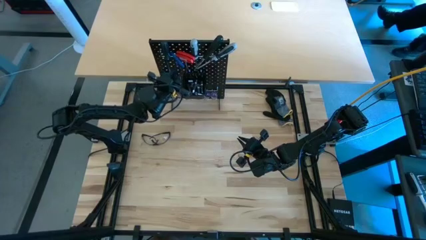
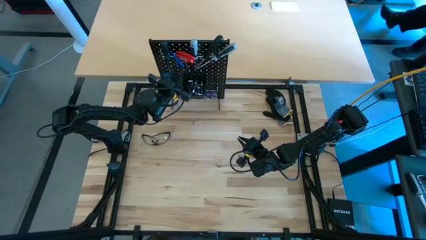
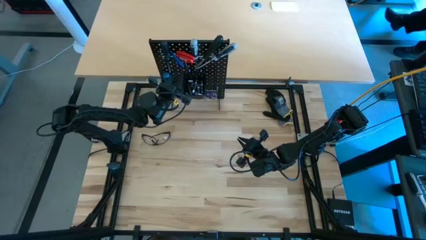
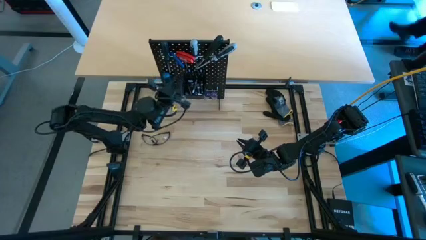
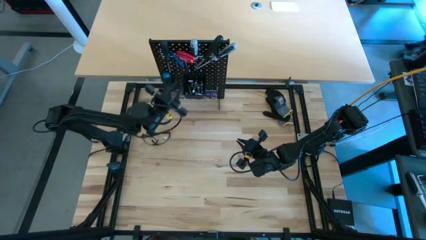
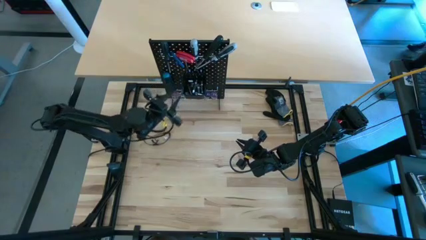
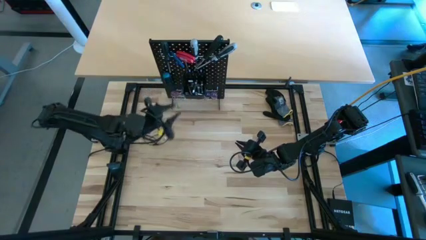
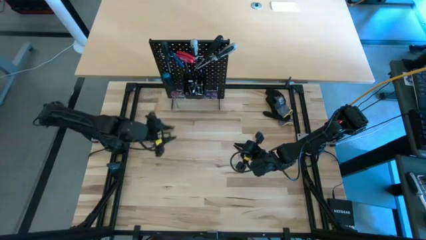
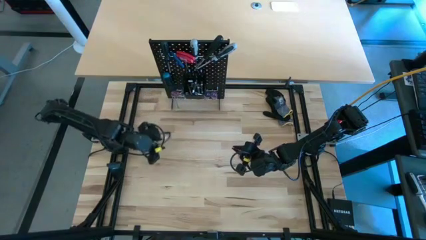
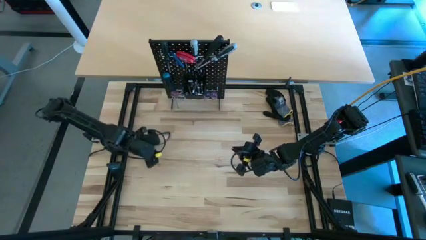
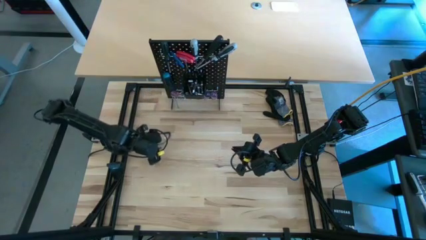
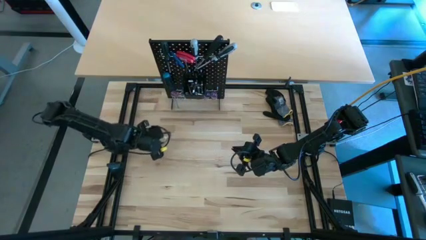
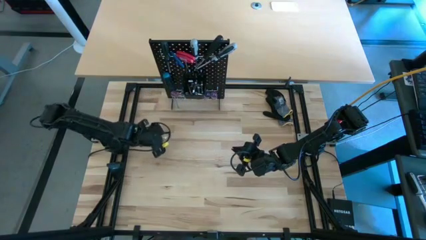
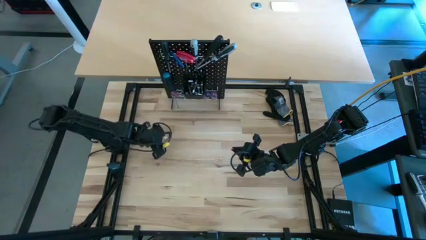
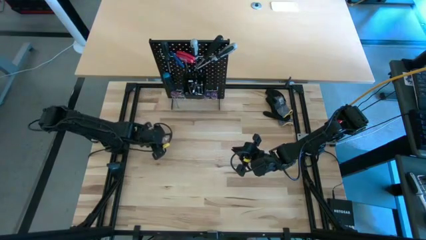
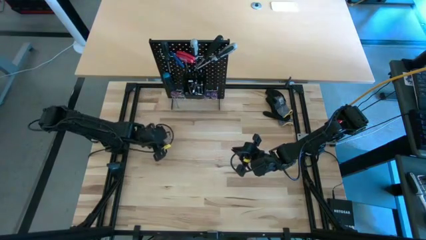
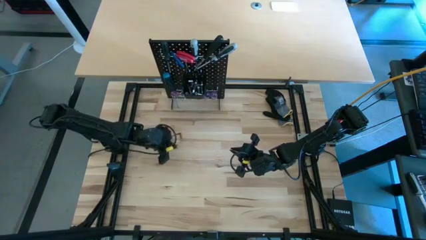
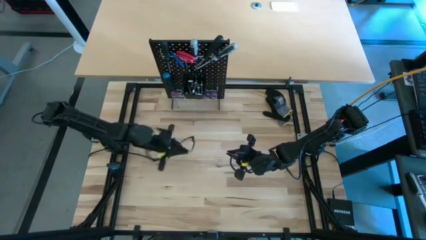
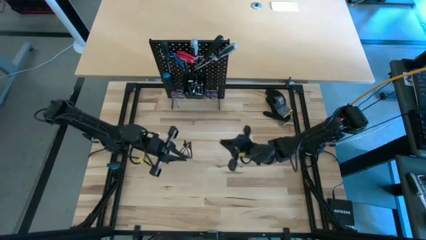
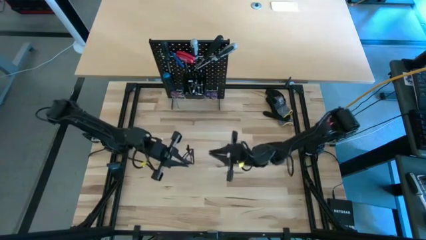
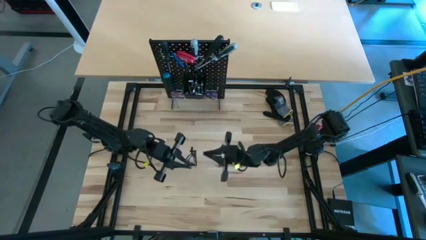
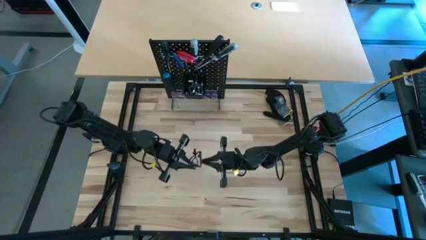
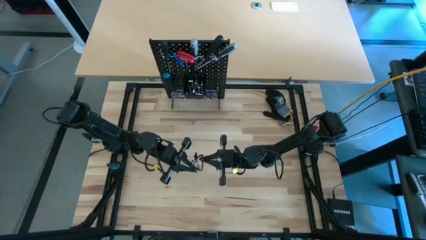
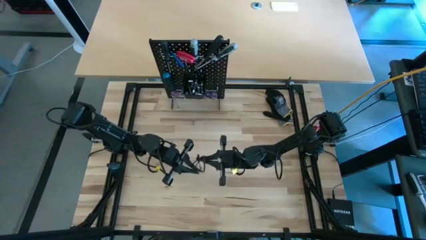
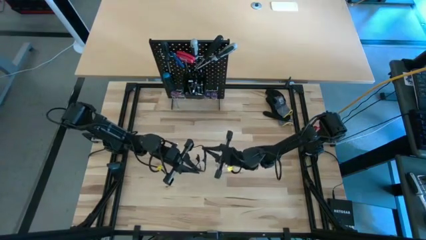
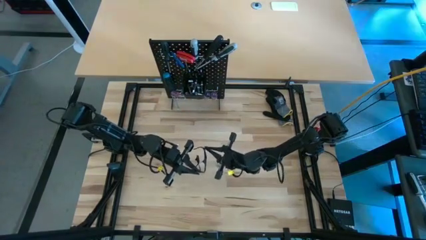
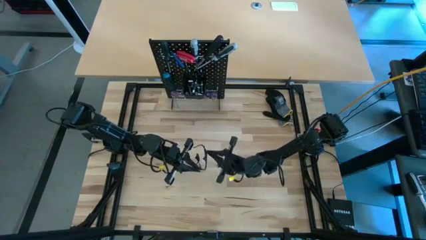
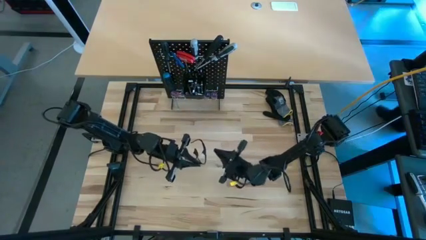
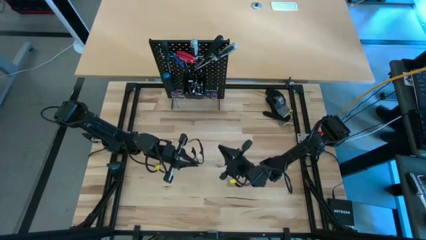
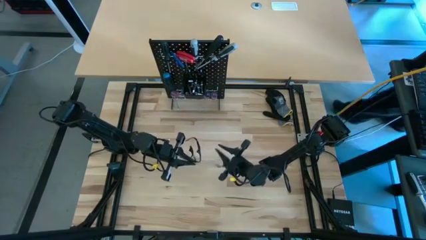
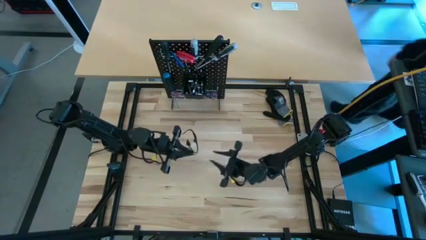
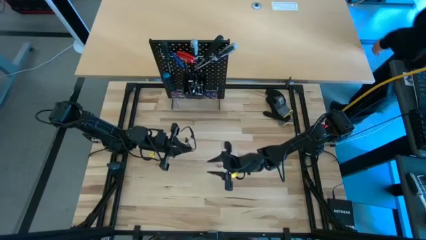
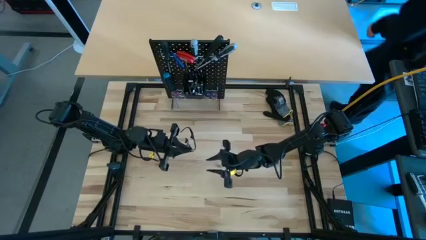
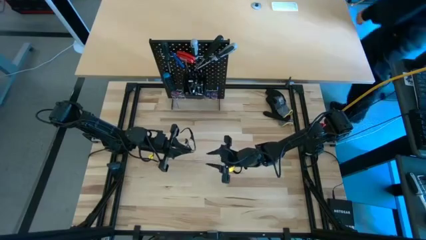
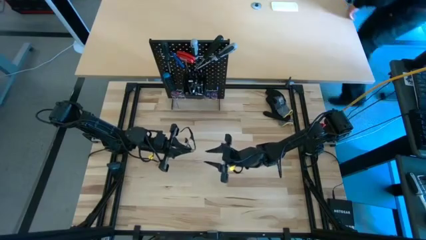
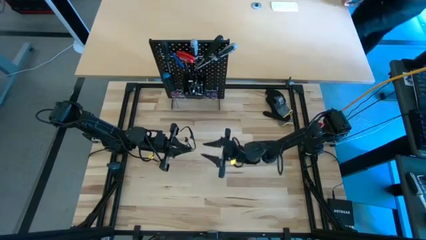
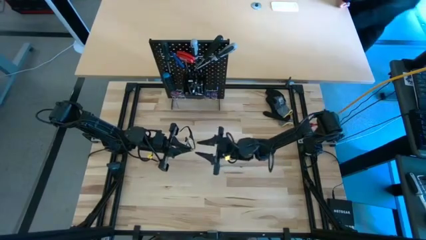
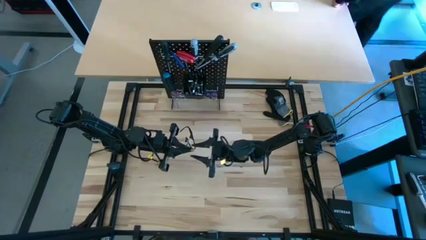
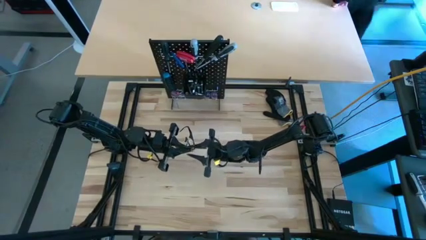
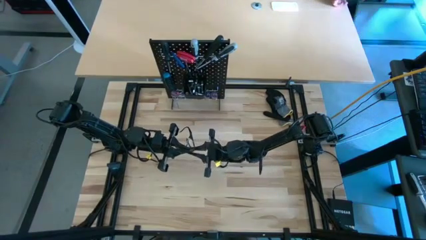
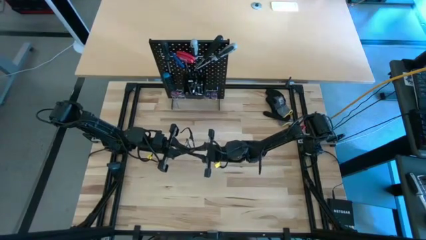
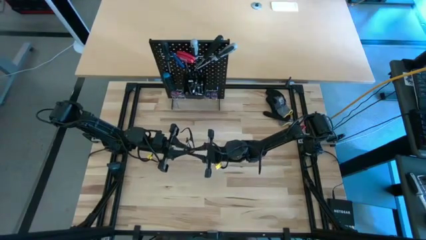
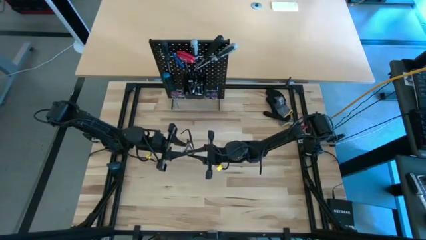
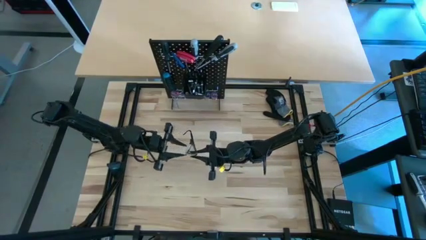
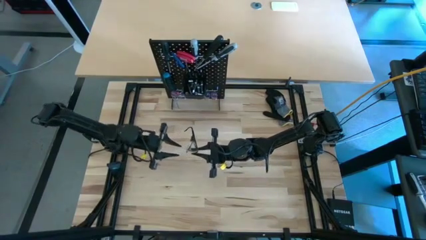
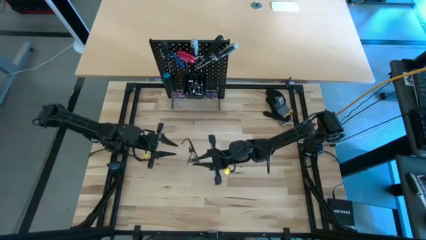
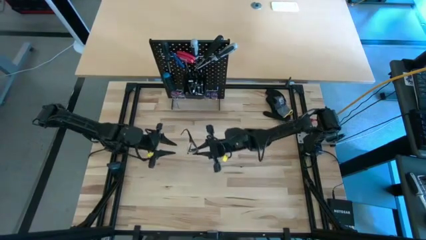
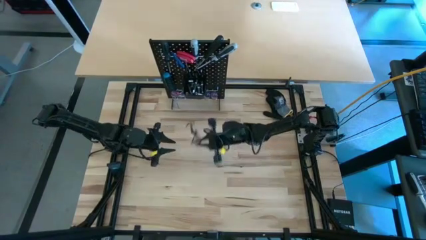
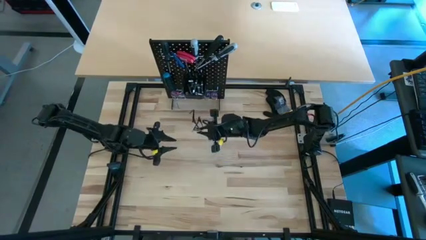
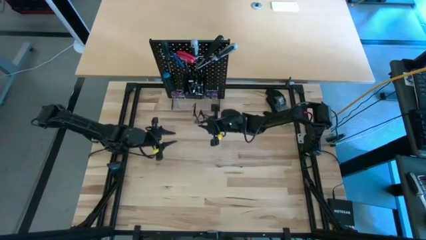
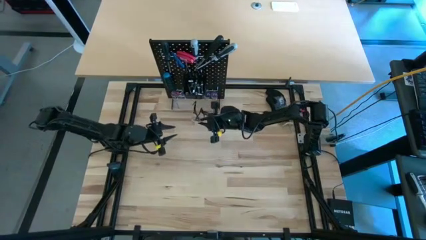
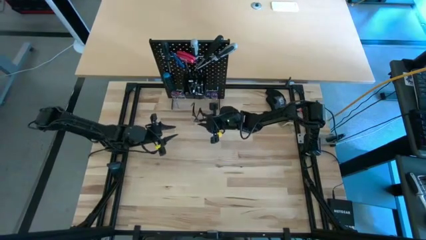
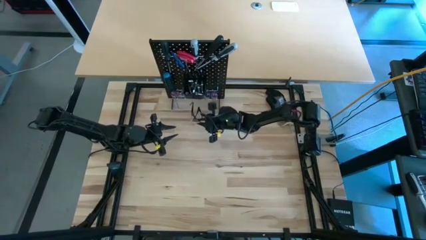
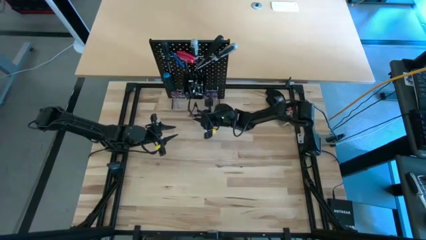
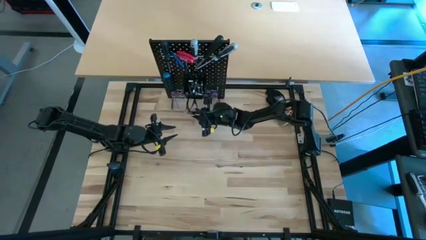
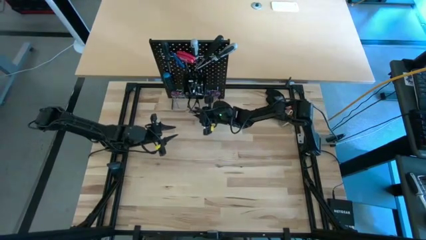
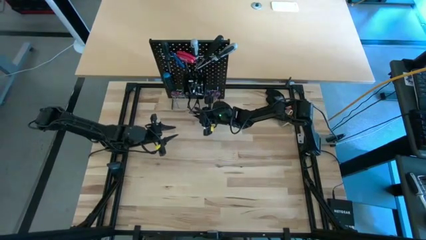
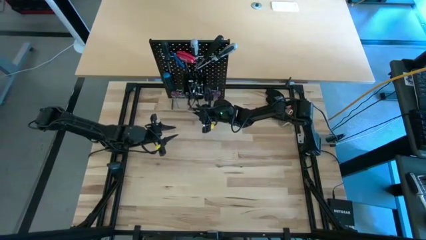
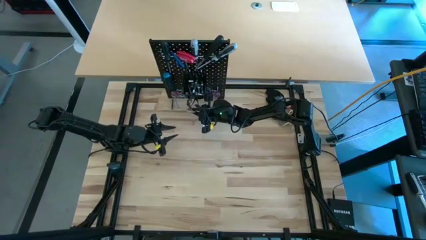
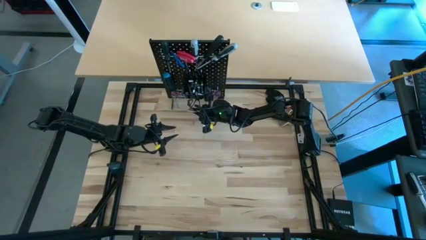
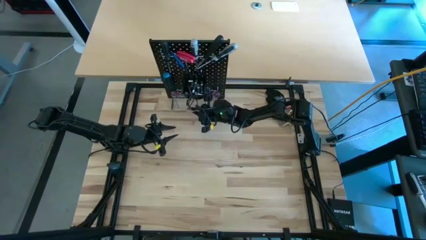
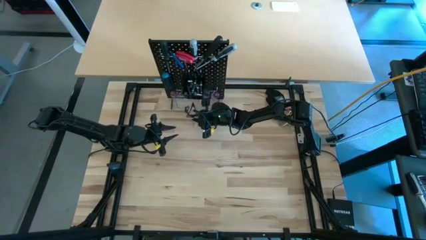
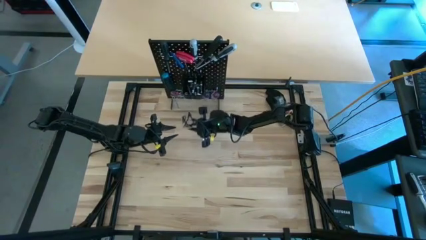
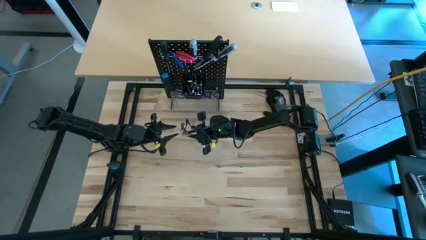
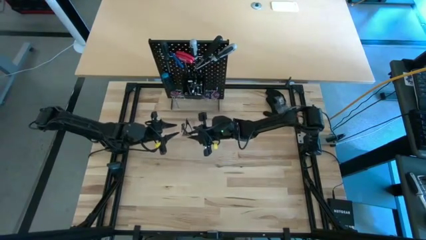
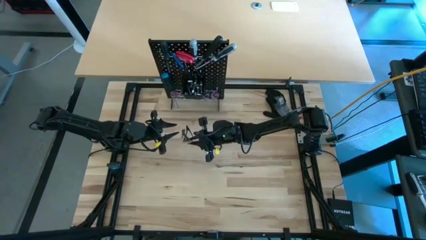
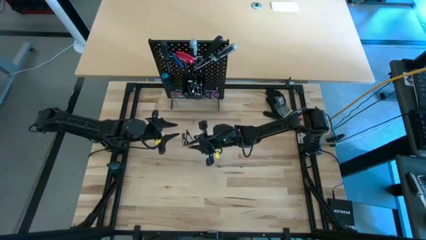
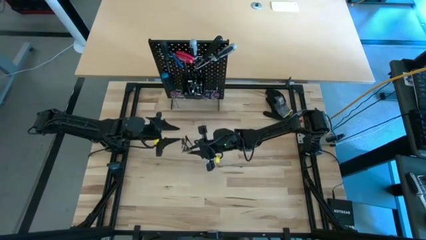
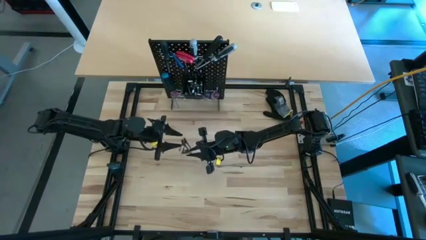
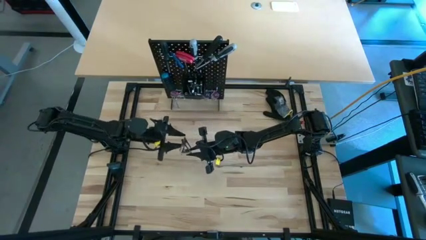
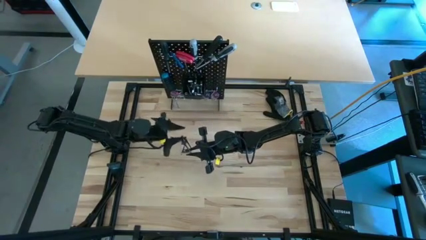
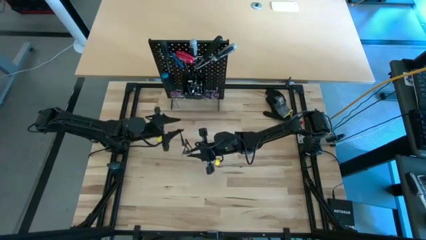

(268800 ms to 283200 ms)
Task: Hang tools onto peg board
Hang the black protective eyewear on the peg board

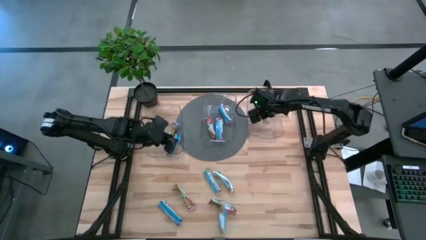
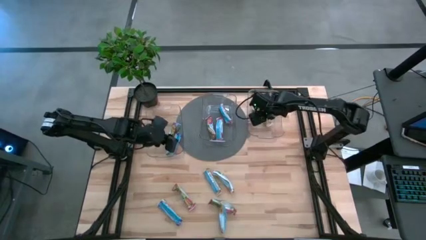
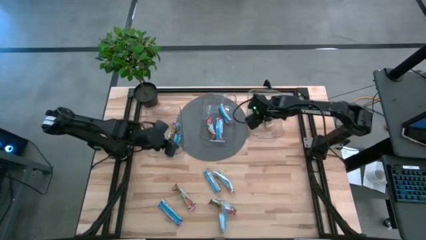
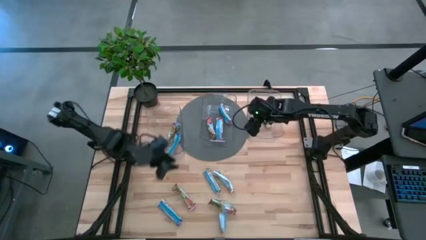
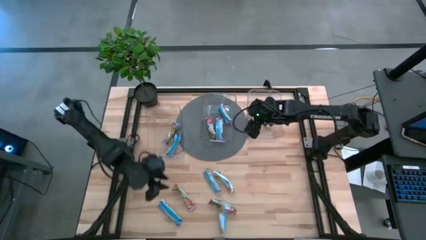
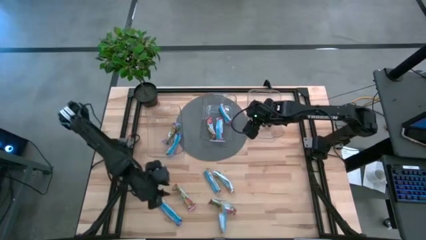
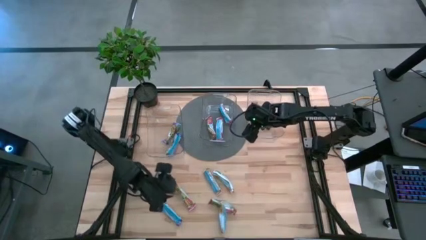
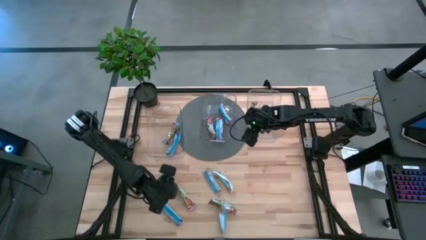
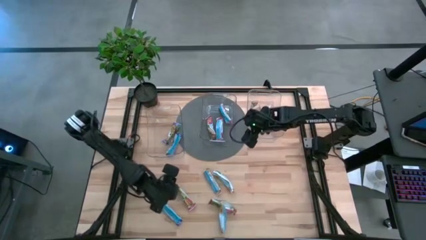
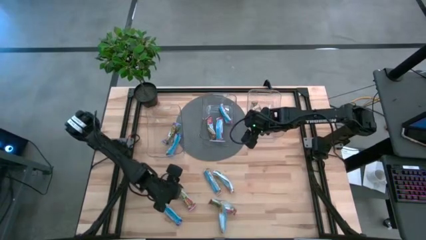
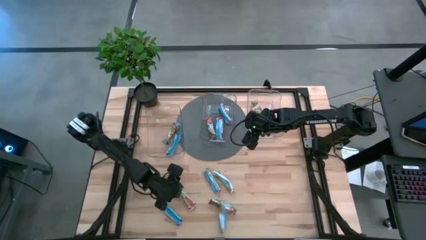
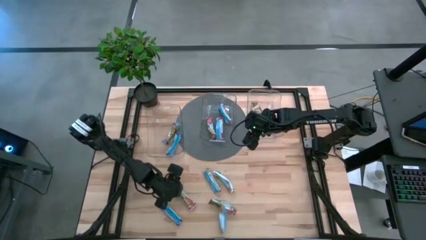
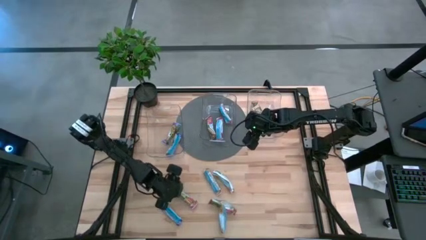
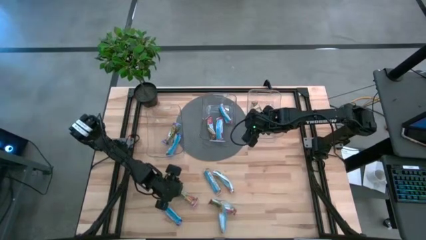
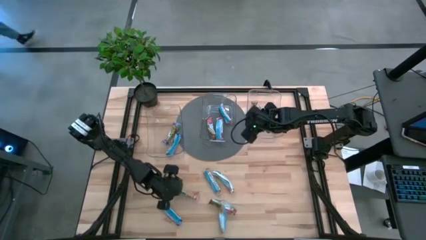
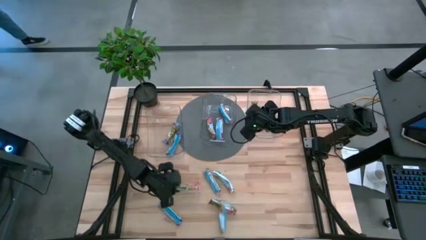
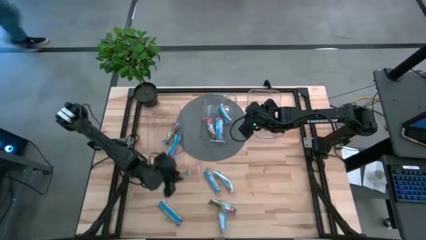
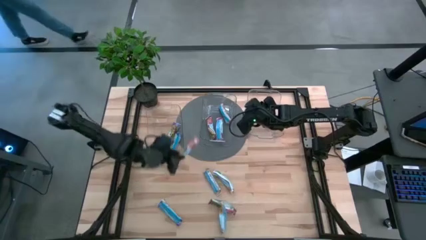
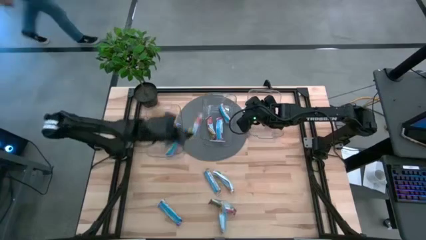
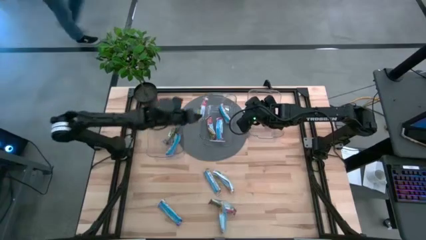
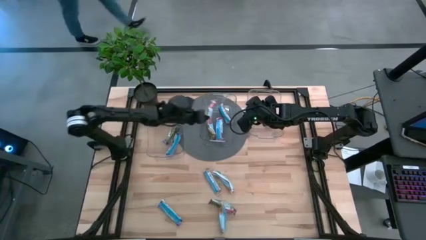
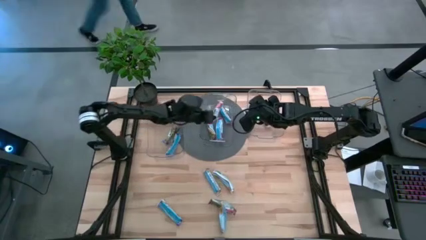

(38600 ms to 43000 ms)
Task: Pick and place Granola Bars by type
Put the red granola bar into the middle transparent bin
